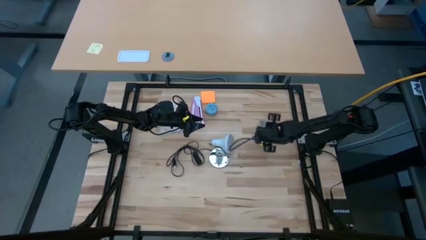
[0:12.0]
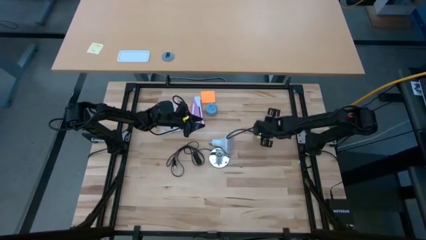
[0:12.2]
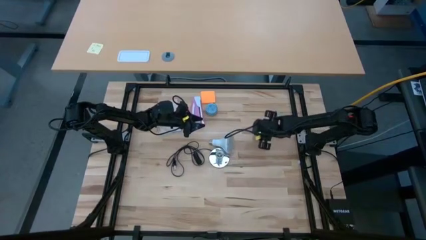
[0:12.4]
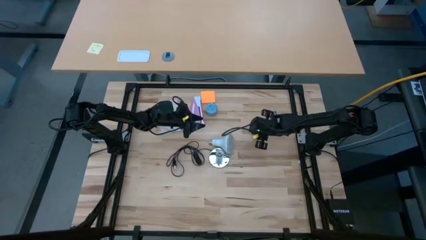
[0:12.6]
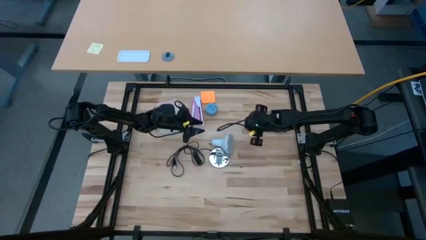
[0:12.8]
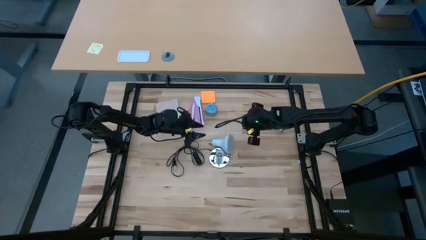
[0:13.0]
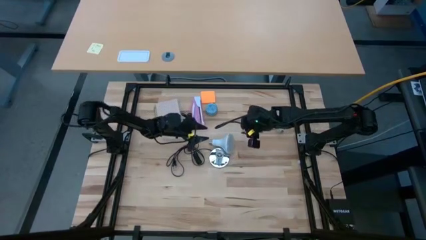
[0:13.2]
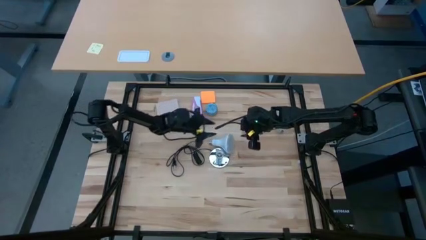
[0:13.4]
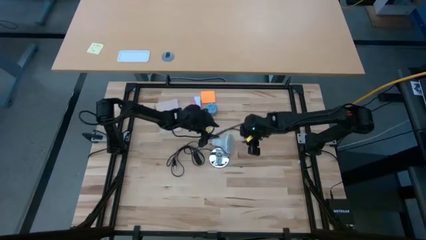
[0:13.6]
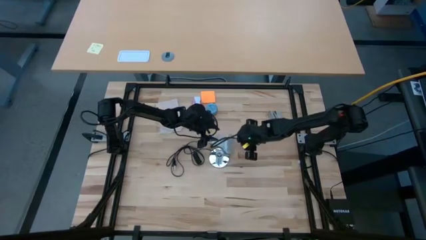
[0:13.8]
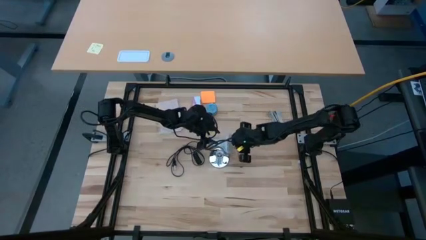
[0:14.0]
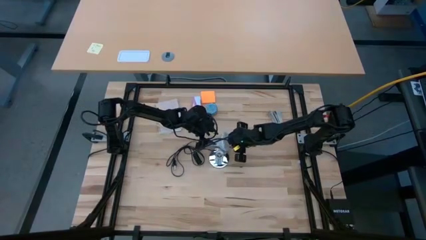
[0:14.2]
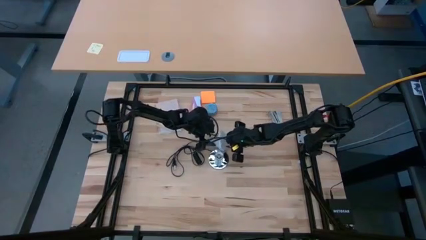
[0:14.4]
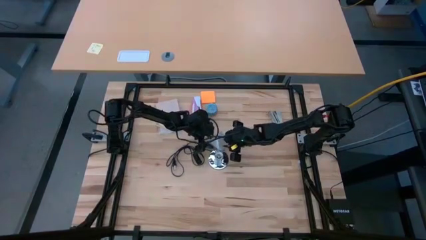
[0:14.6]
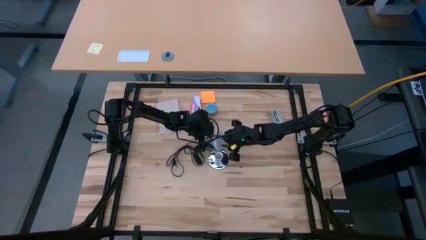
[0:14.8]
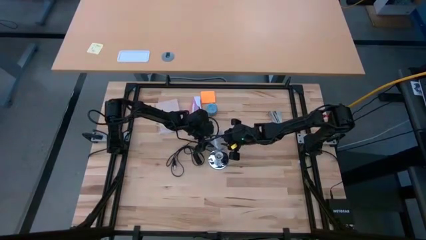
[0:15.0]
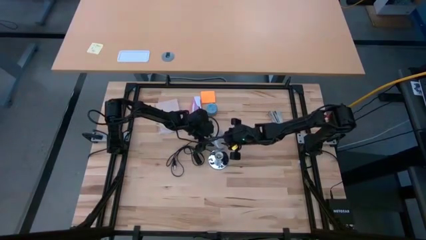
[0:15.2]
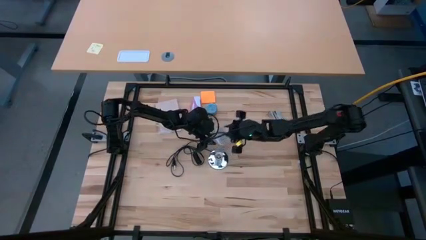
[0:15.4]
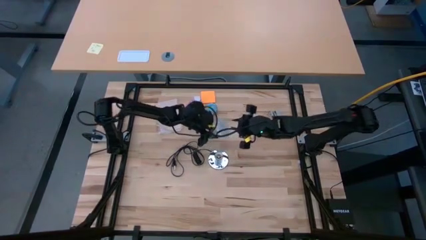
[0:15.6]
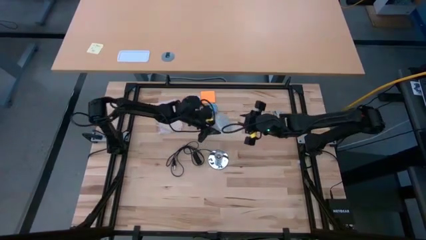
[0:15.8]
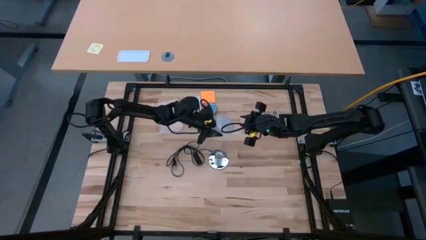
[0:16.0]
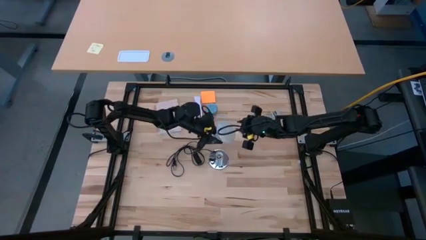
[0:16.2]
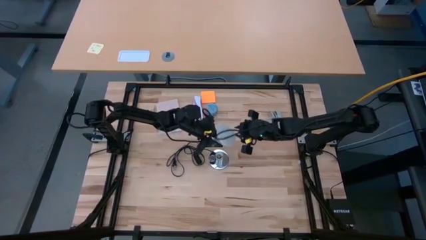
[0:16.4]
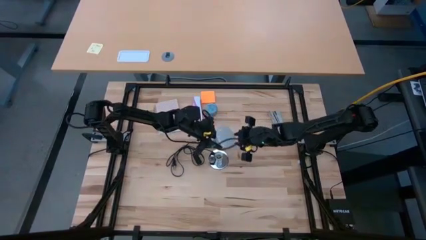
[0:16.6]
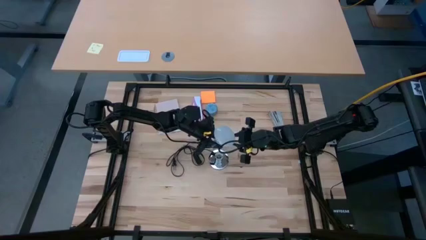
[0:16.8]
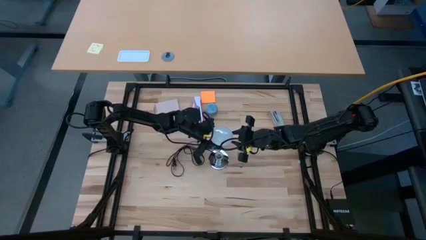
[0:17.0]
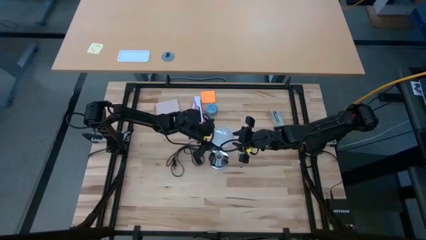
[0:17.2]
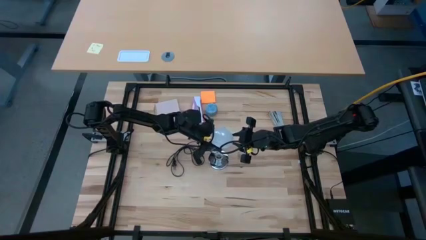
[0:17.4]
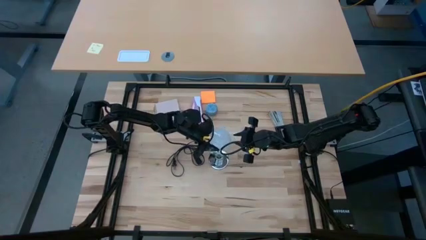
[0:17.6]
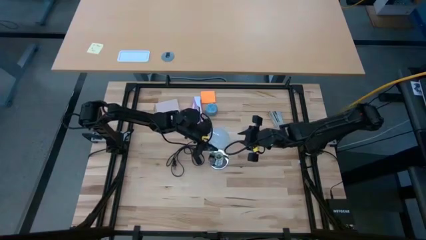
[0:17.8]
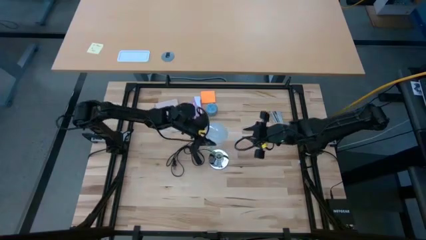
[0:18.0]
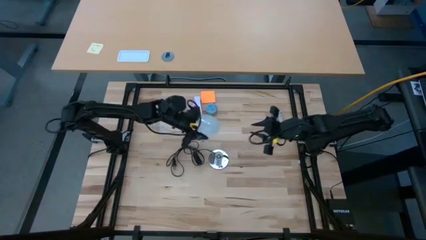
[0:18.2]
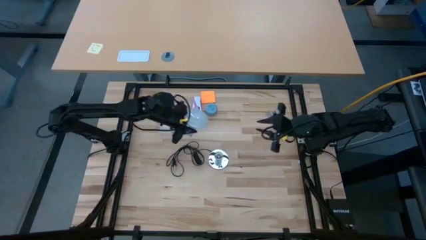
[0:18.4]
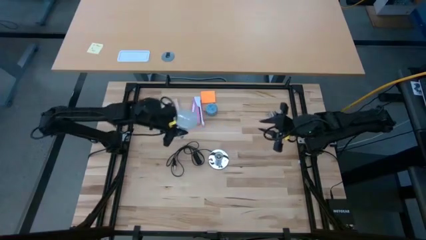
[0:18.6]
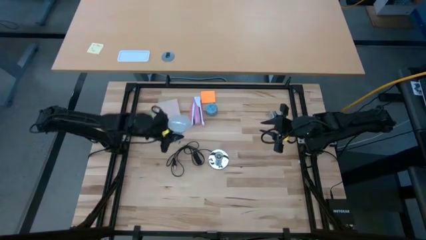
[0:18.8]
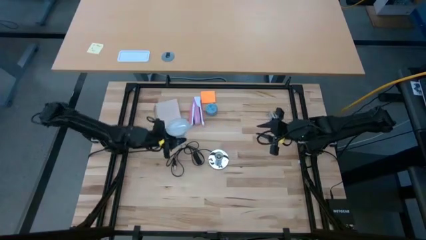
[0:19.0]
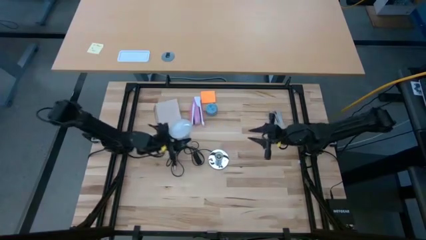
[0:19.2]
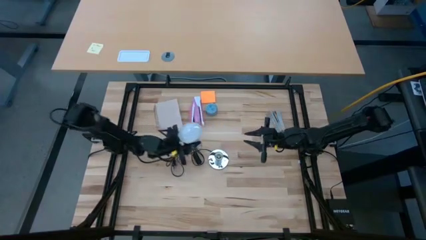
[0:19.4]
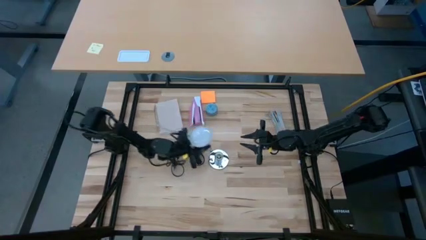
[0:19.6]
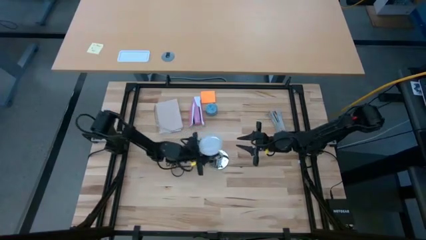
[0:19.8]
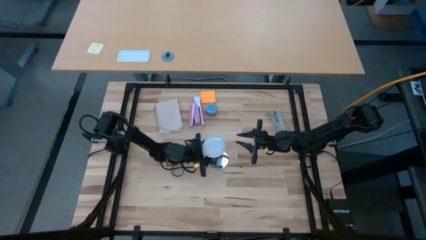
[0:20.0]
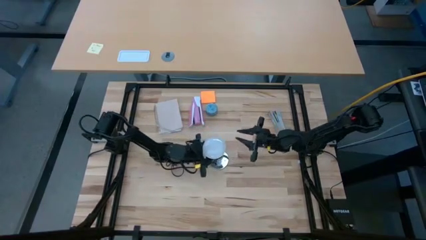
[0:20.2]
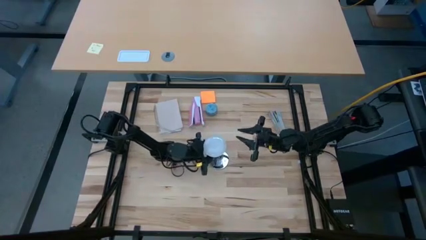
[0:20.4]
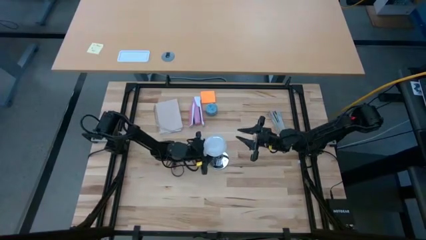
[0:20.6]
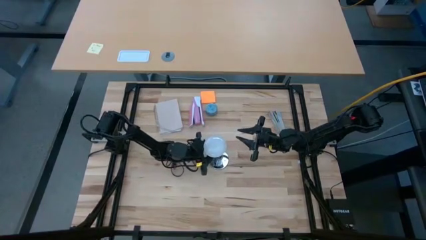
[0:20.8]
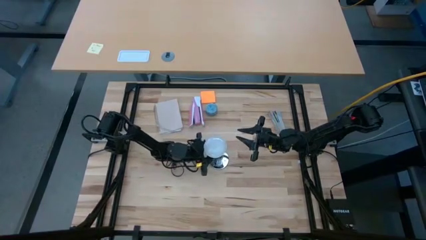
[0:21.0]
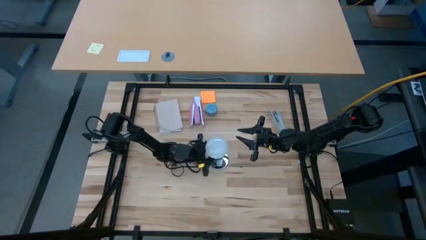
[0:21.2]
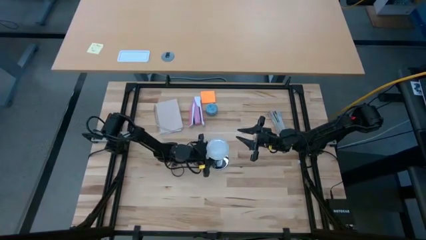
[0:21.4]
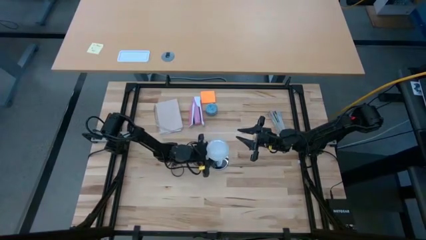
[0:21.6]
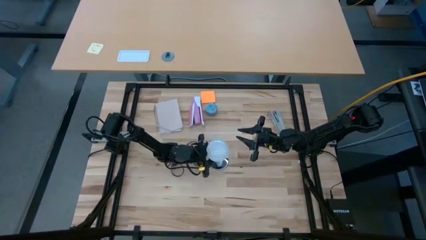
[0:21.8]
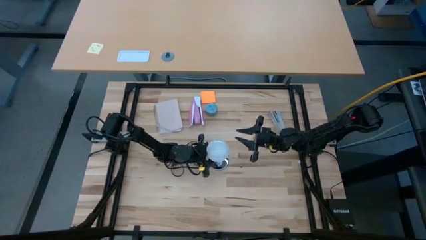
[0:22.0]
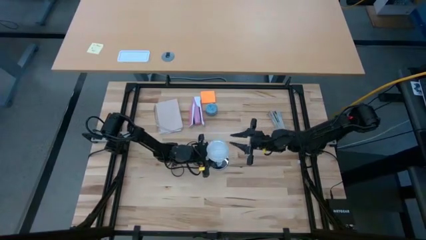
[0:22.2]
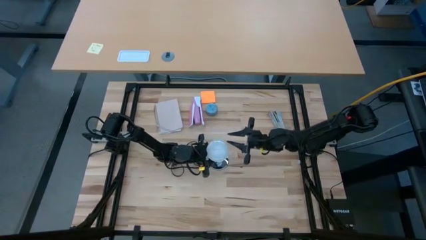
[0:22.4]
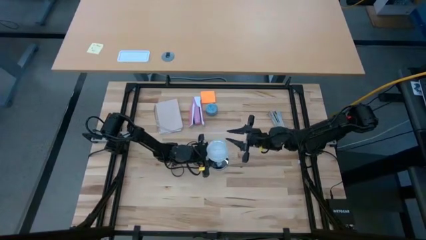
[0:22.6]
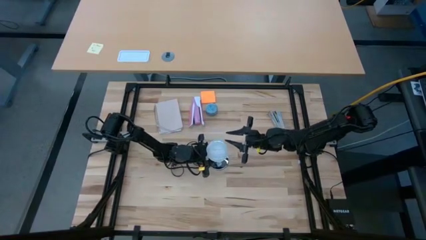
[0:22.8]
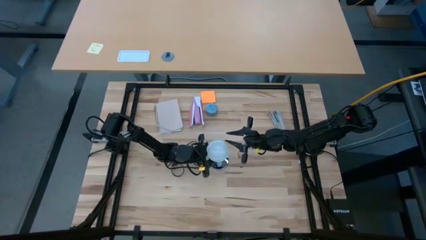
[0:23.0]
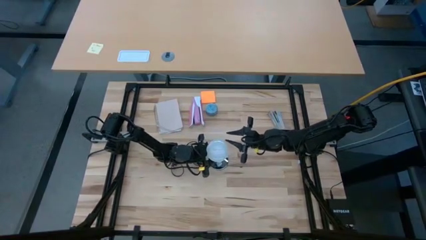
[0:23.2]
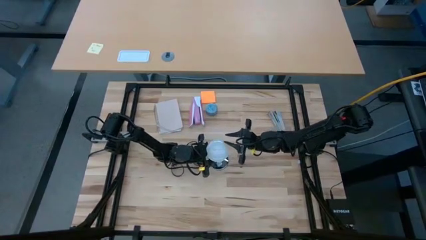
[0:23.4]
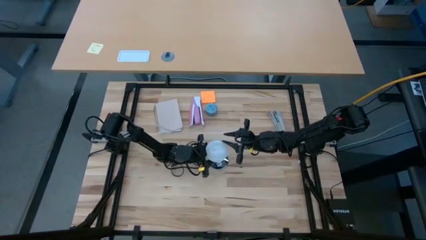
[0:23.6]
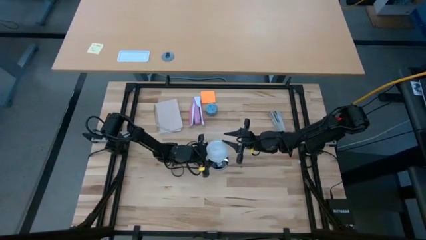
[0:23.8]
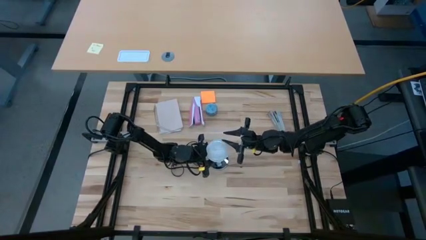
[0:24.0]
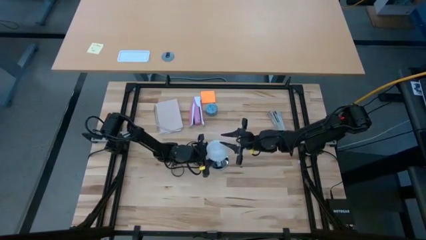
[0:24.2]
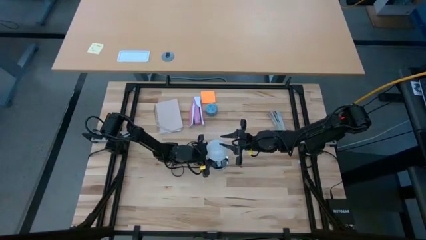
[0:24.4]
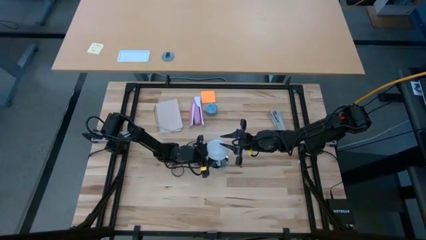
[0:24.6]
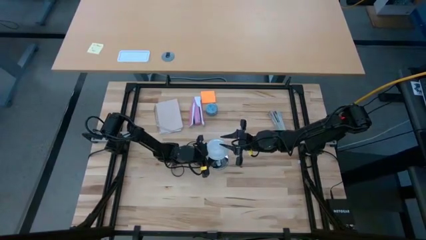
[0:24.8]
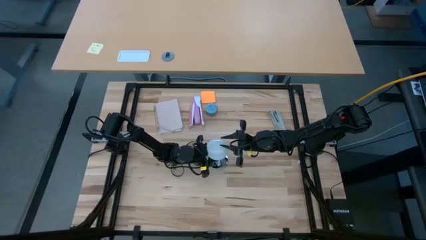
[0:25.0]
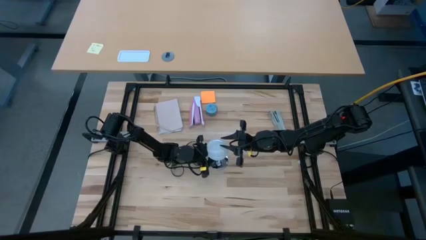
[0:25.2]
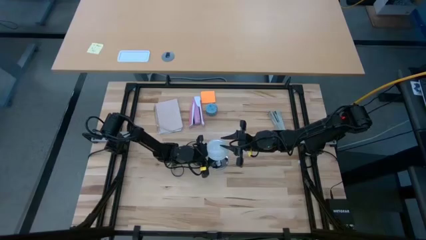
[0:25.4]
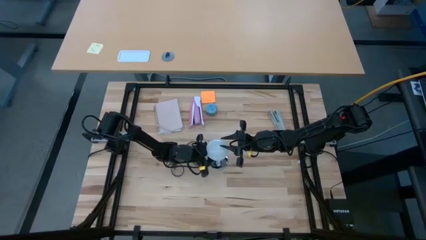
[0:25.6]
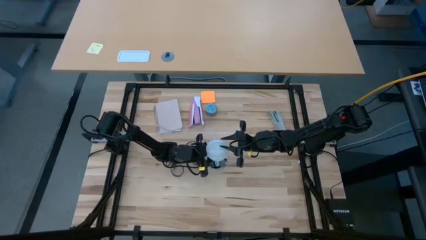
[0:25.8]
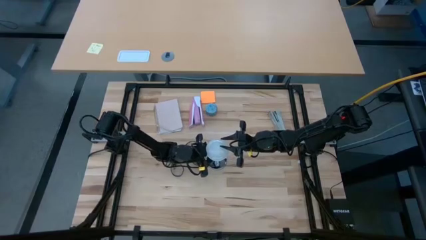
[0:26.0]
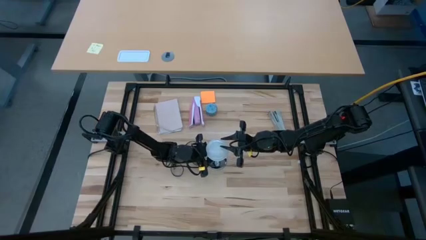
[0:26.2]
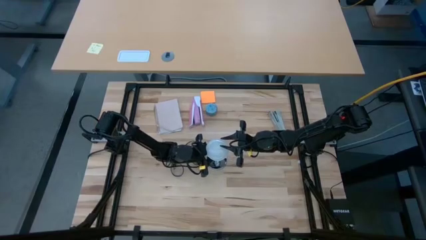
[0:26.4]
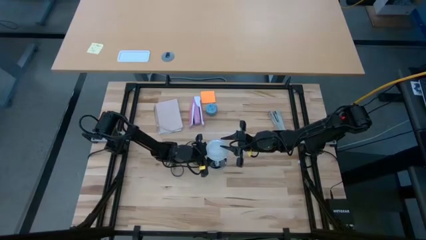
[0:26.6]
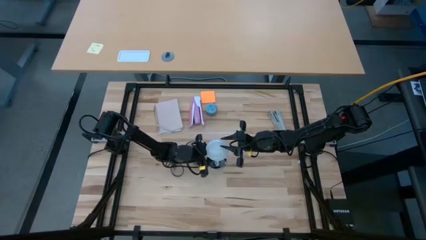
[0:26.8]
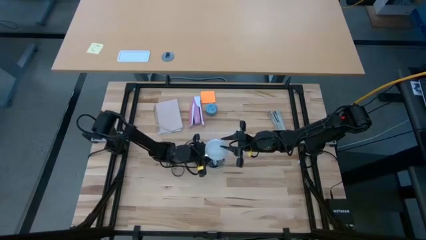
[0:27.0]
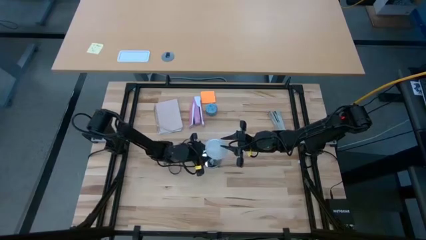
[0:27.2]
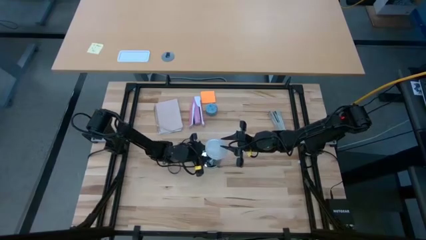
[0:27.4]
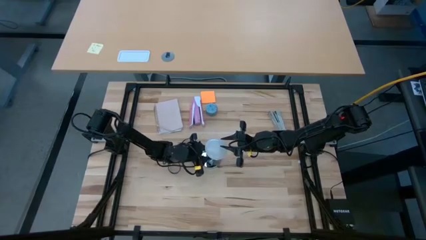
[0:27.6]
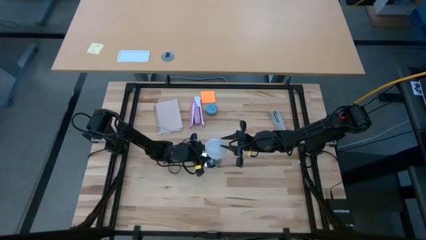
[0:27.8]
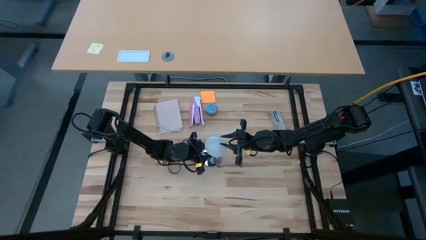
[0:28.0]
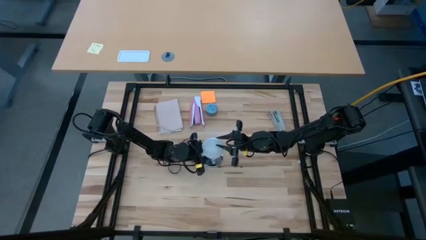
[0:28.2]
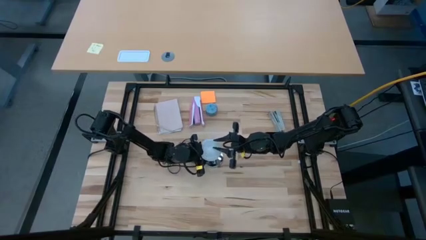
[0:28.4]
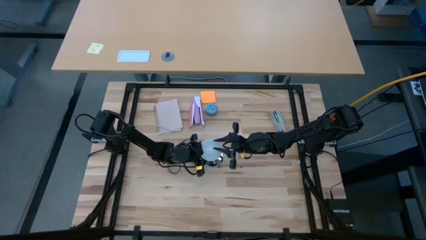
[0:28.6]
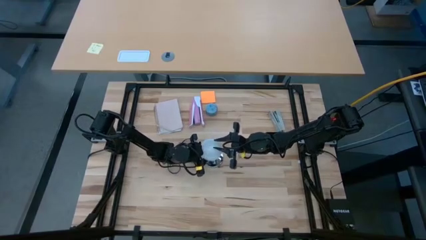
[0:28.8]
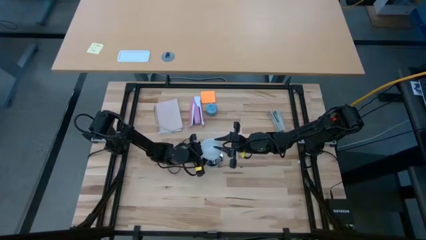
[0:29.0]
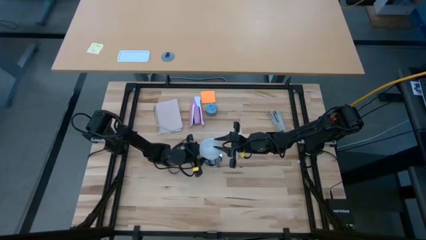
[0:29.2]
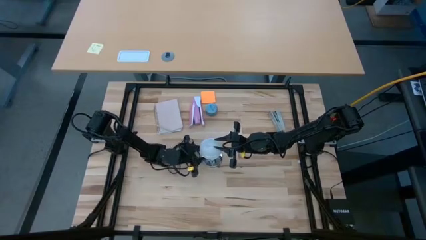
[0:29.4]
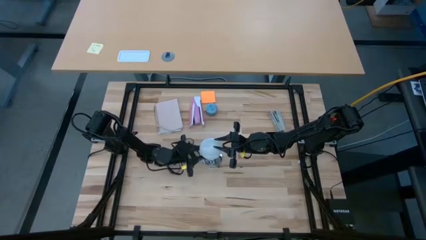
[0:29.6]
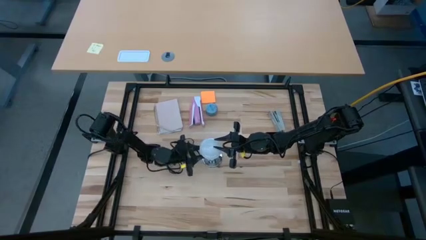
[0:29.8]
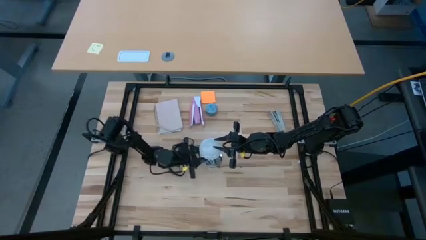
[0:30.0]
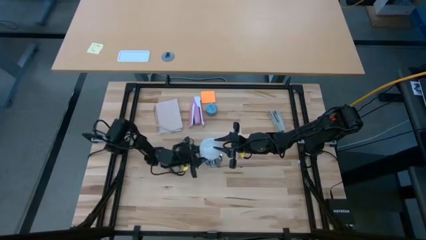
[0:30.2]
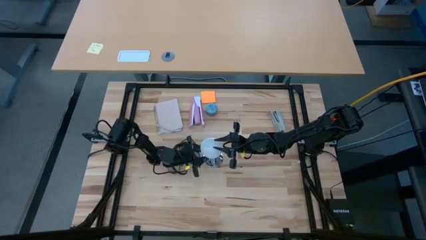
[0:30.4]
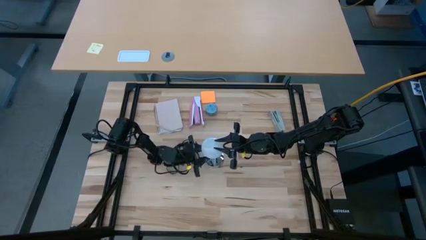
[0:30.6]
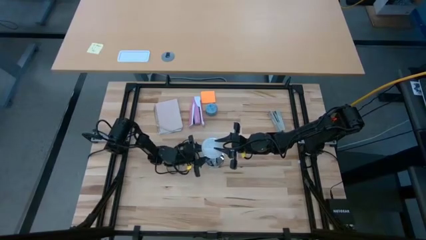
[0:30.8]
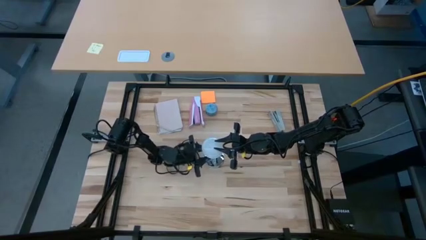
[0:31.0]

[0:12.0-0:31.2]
Task: Screw lightbulb
Insert the lightbulb into the lamp
